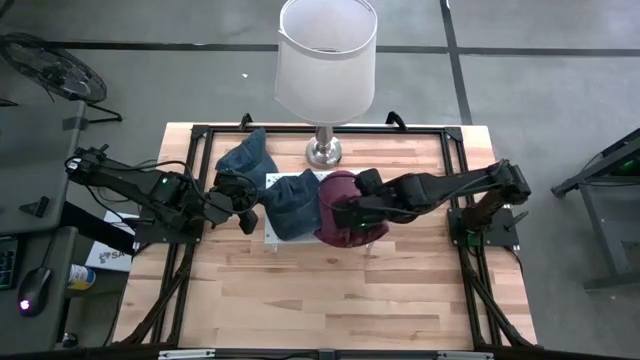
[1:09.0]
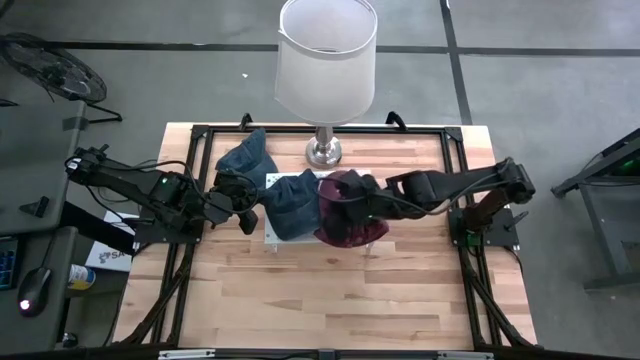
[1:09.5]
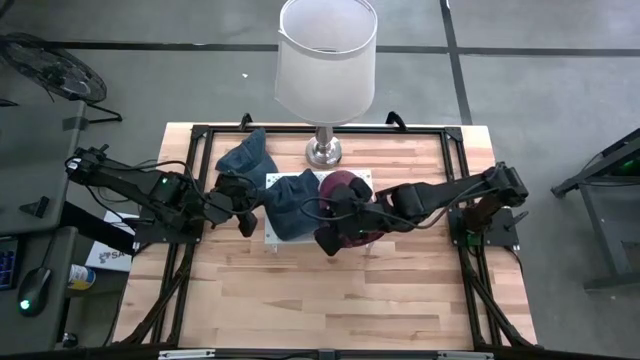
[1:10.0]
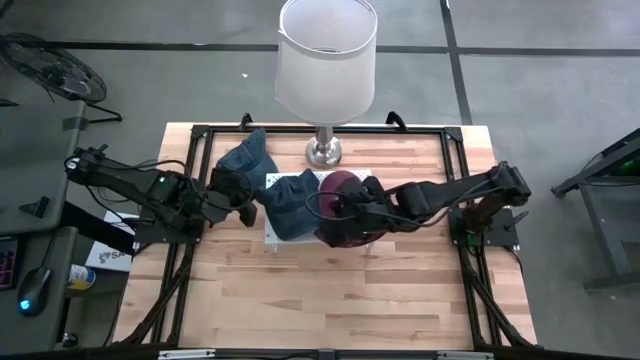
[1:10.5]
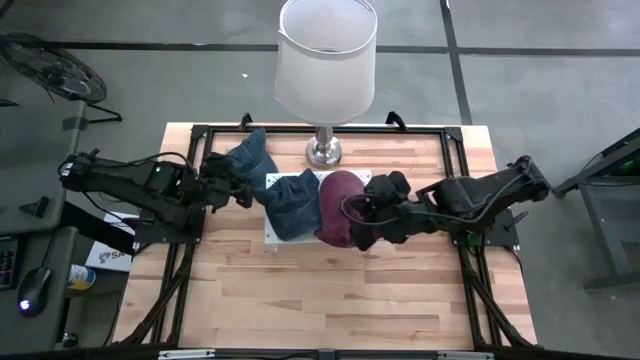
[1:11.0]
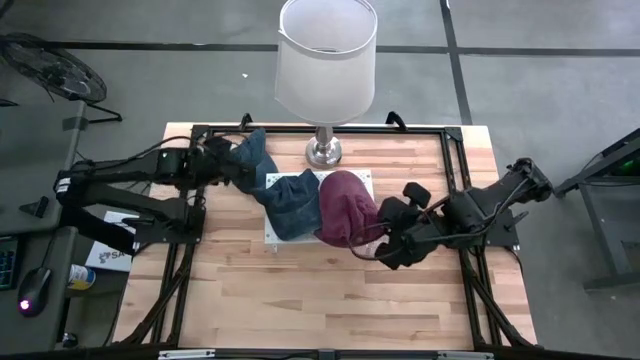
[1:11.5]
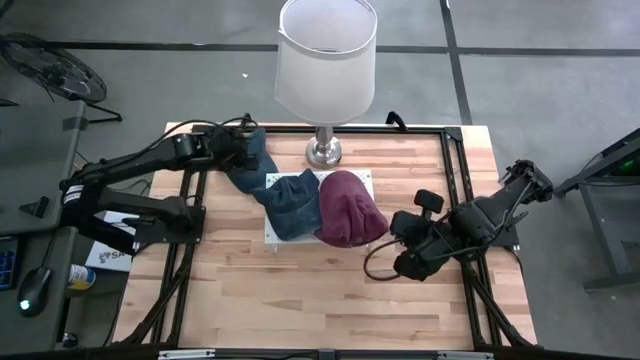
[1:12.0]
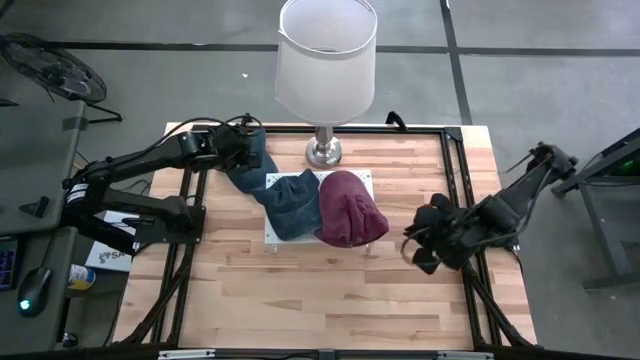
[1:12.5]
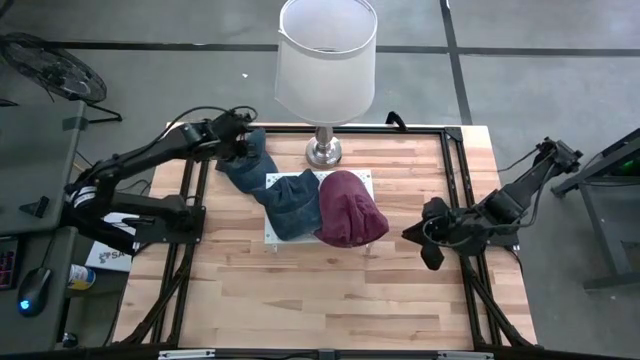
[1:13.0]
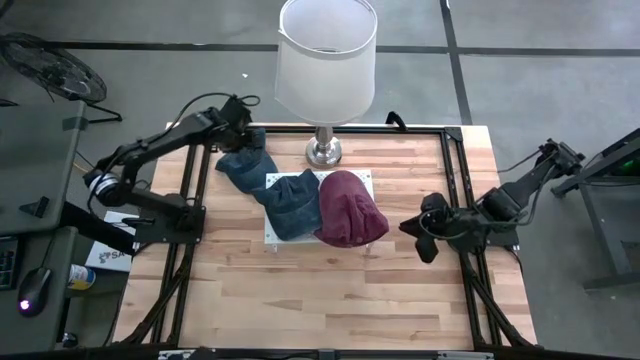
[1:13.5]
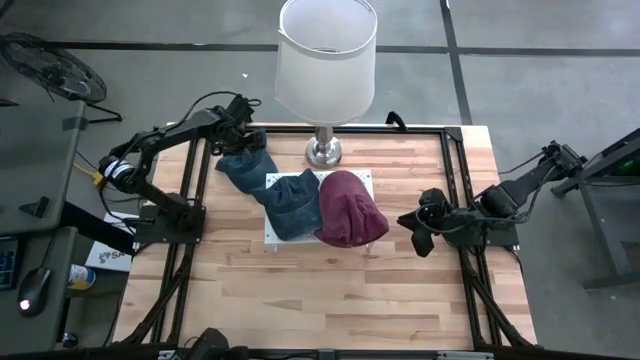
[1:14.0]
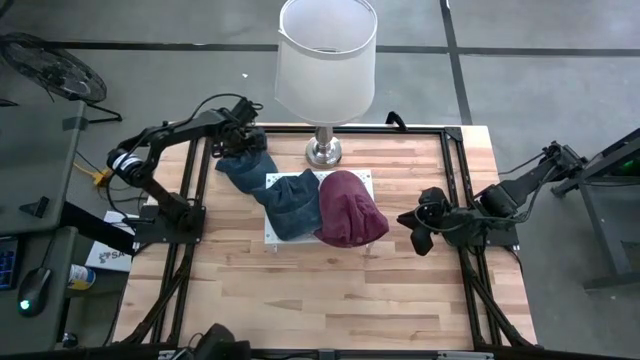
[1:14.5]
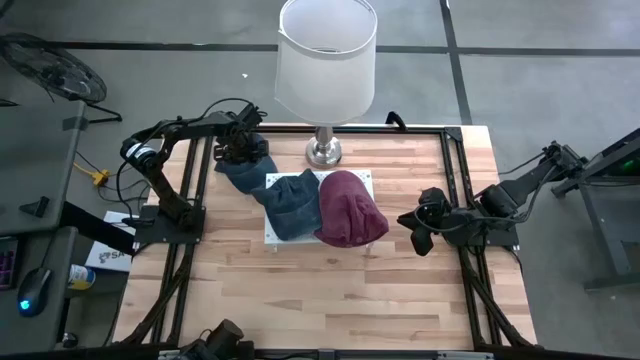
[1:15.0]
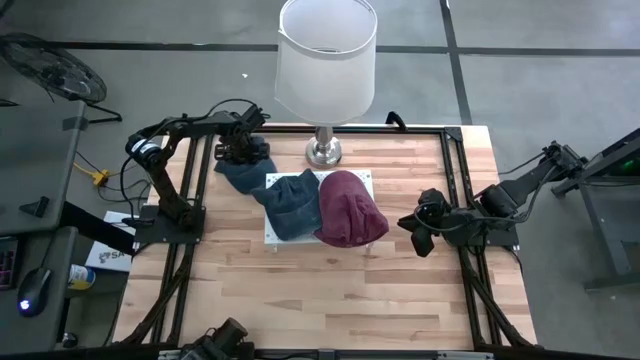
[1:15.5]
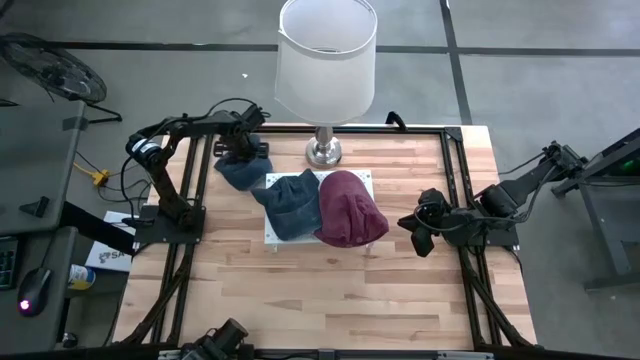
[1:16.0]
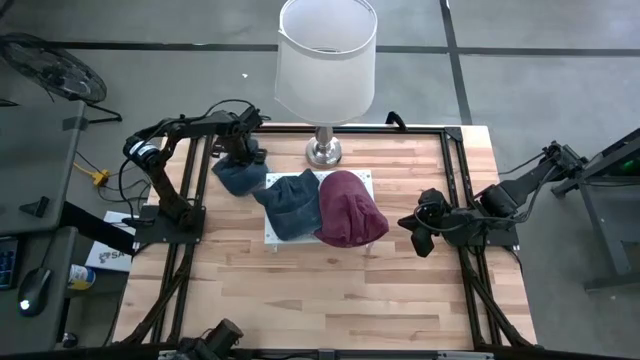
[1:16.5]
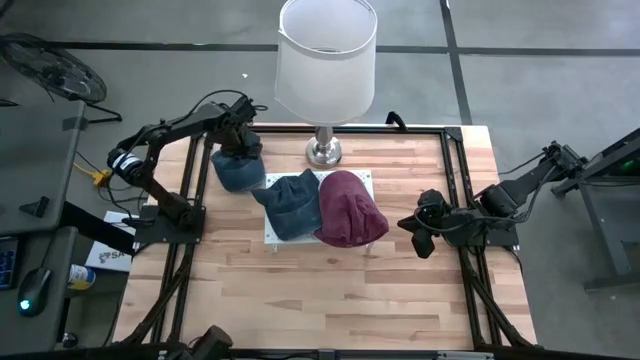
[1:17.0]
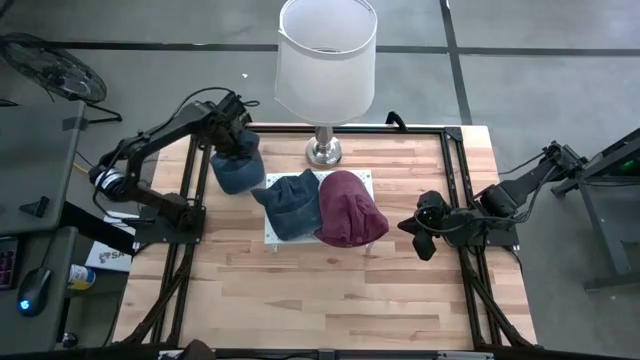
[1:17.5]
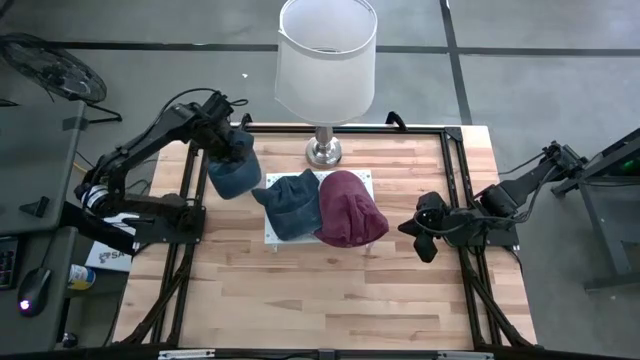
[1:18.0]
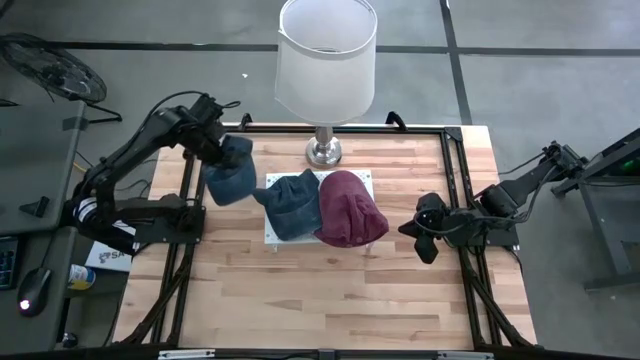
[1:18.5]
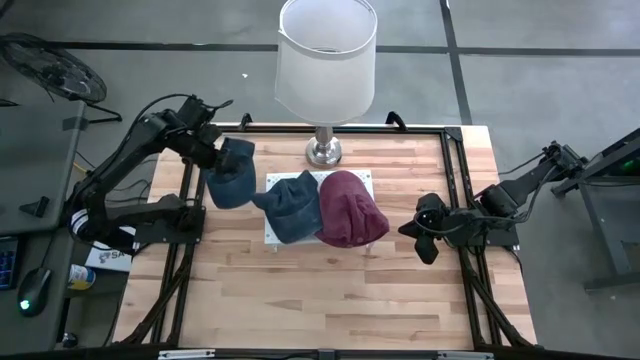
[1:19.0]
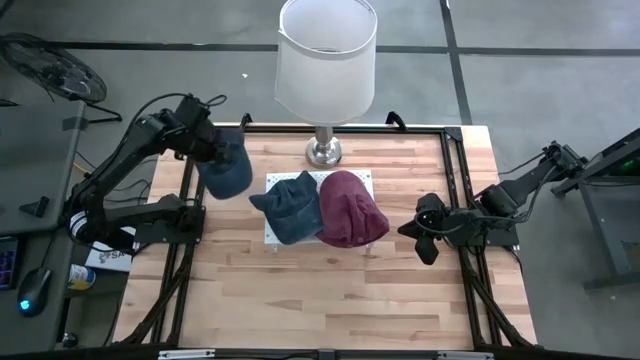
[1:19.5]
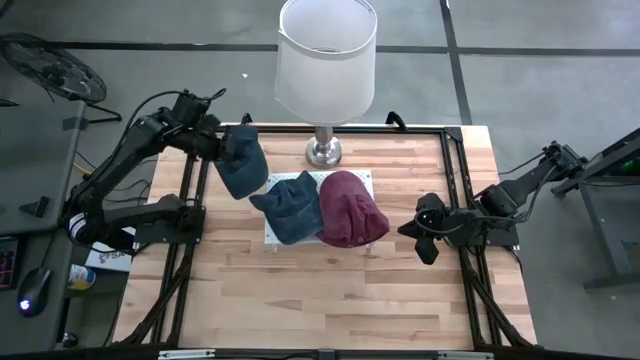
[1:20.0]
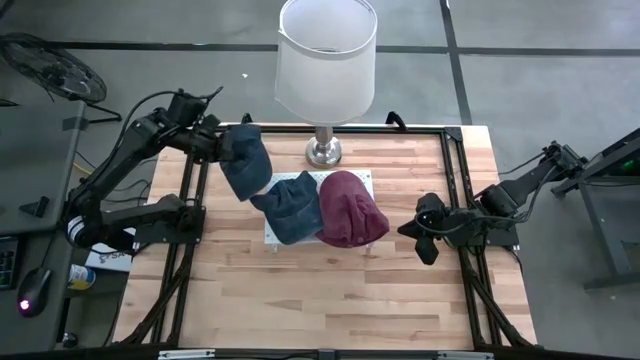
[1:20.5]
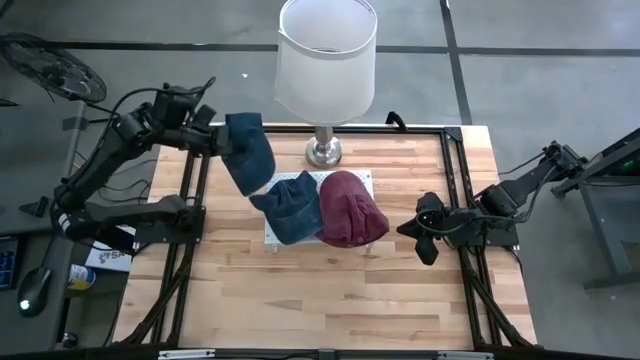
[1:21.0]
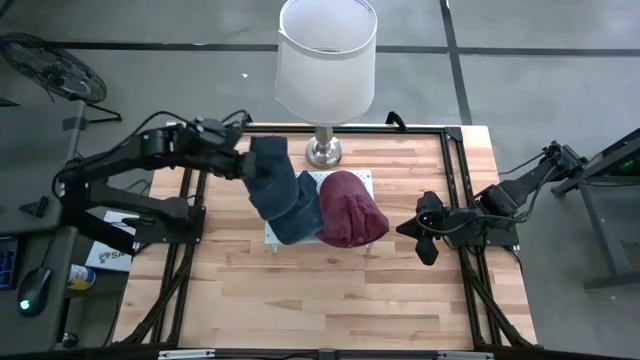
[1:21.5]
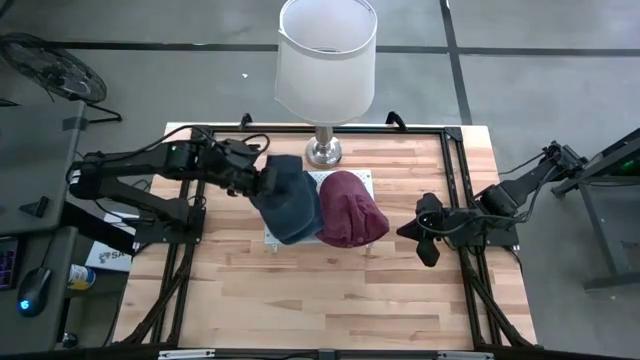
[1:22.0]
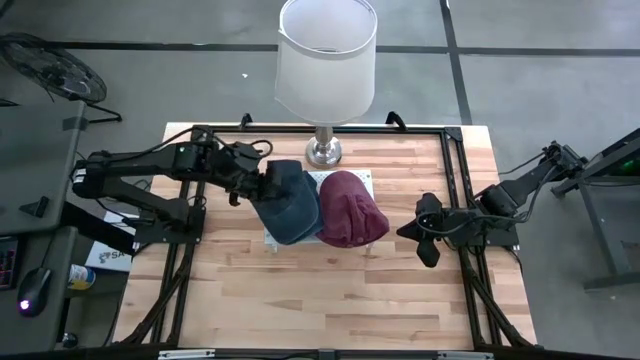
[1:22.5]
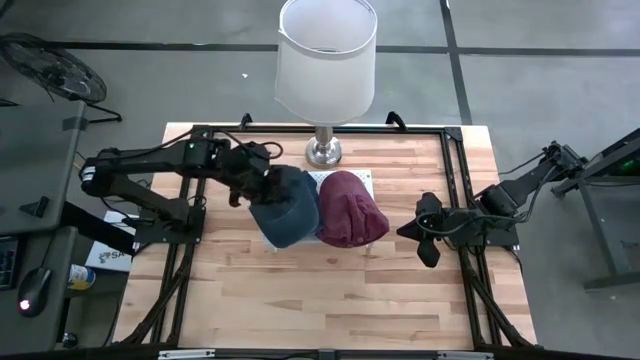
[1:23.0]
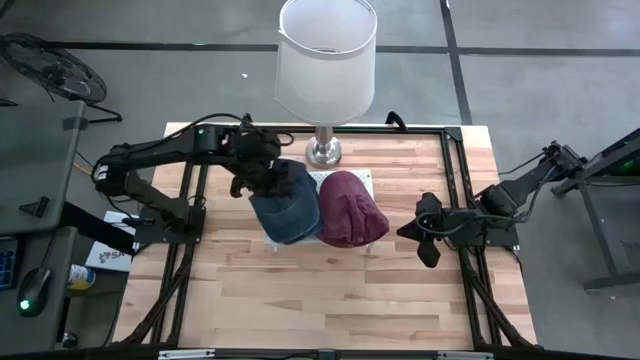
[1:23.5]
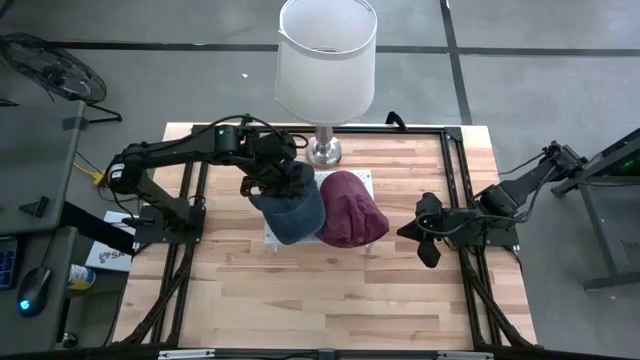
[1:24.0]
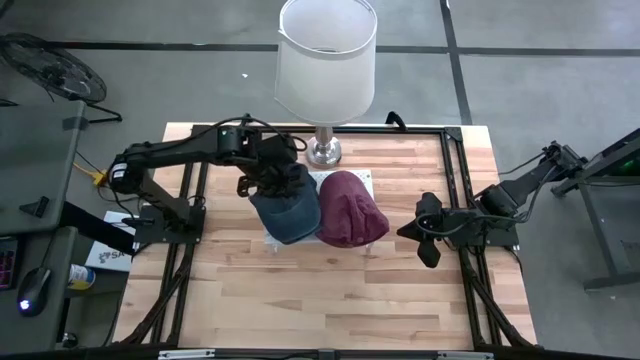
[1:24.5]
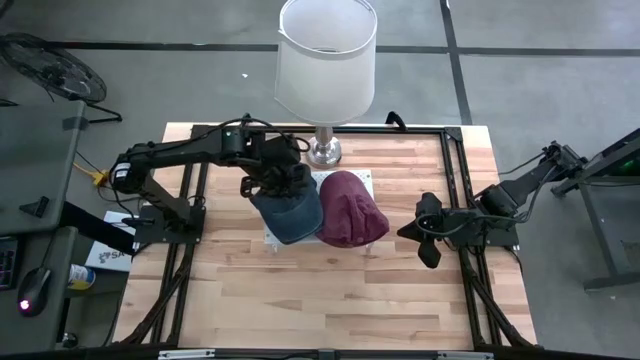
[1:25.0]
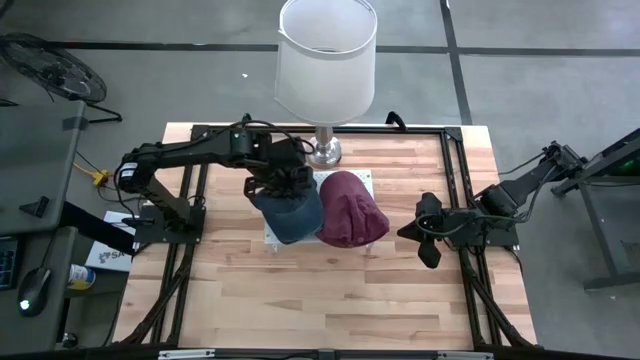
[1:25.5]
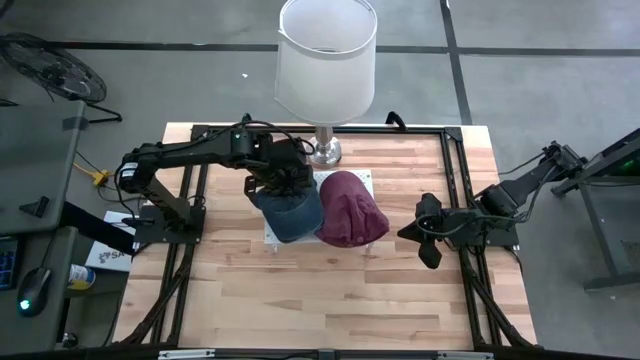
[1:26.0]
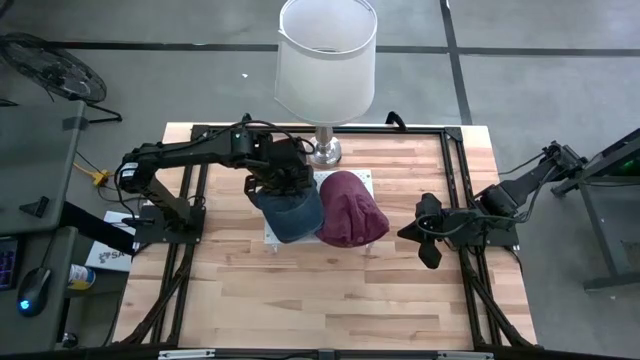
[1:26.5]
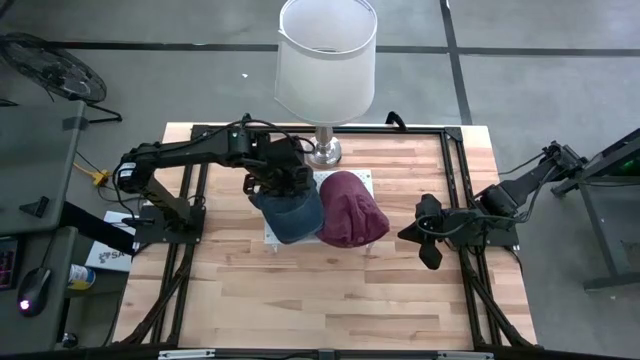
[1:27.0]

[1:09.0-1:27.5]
Task: Pick & Place hat
Stack the blue cap on top of the other blue cap on the shelf

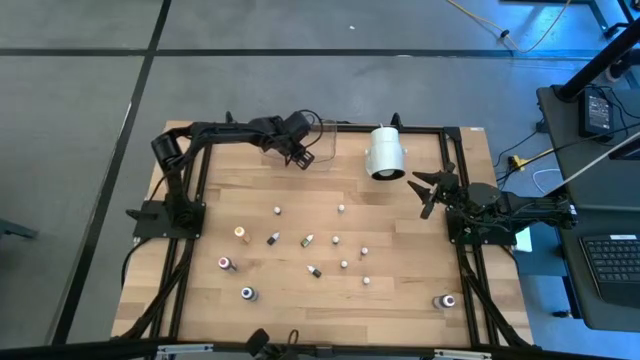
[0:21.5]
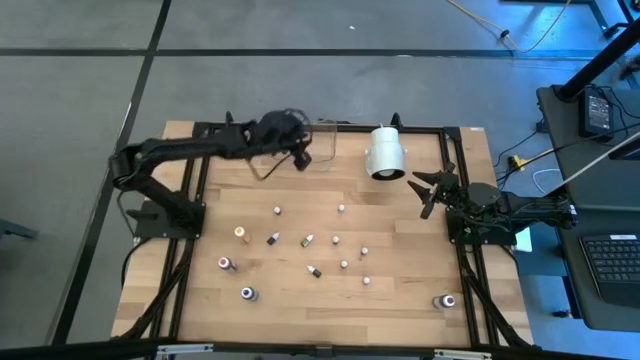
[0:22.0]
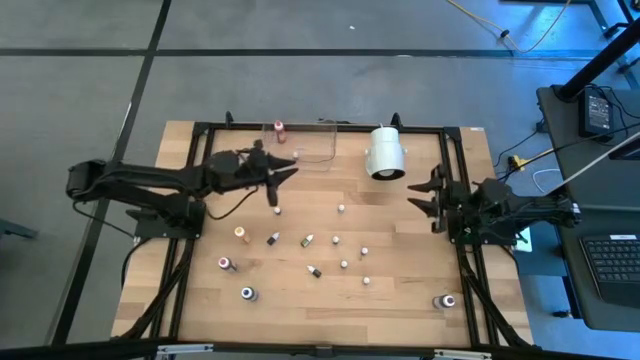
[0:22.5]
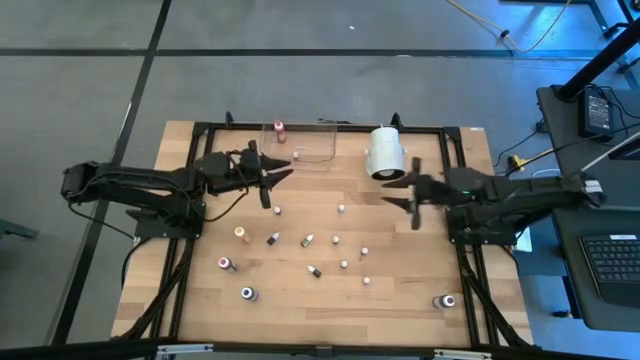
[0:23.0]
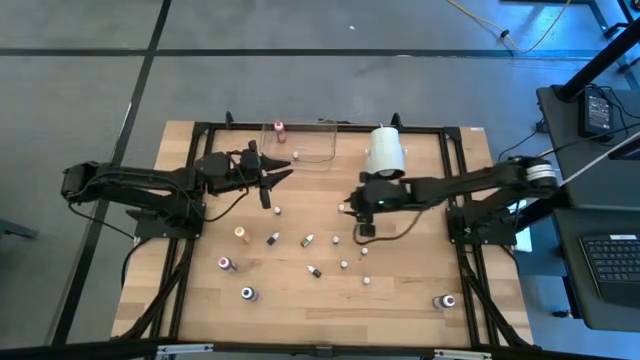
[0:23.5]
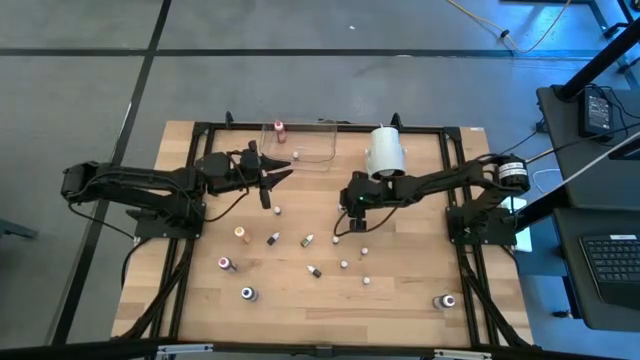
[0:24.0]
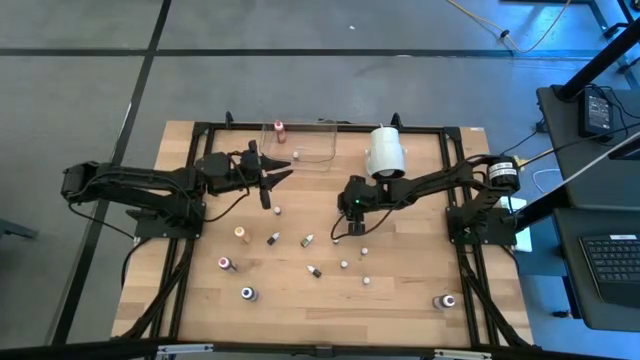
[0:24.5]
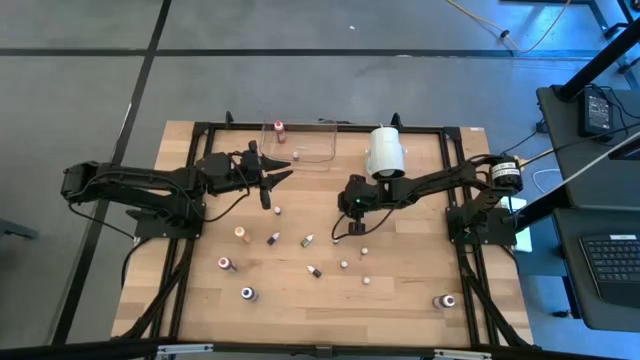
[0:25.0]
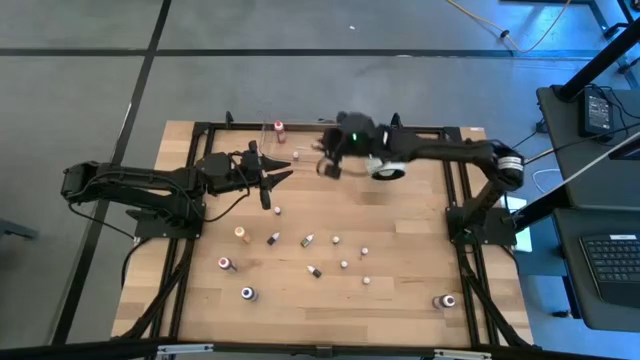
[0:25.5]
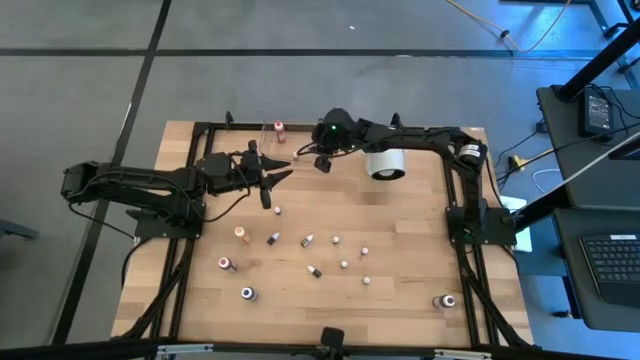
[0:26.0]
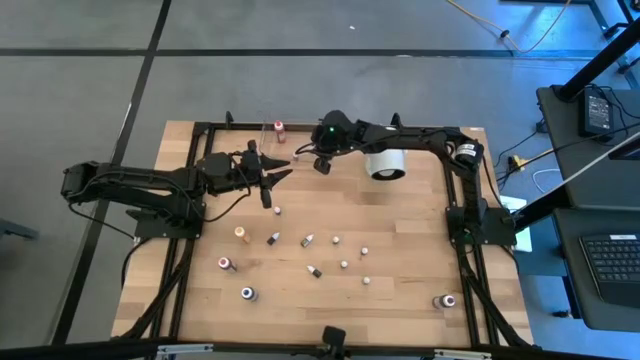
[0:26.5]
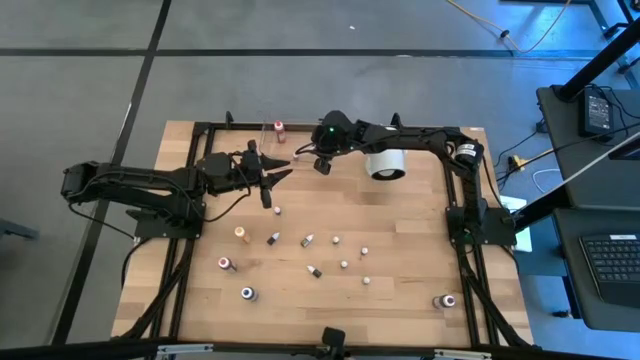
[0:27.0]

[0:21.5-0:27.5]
Task: Pick & Place food coloring
Put the red food coloring bottle into the transparent bin
